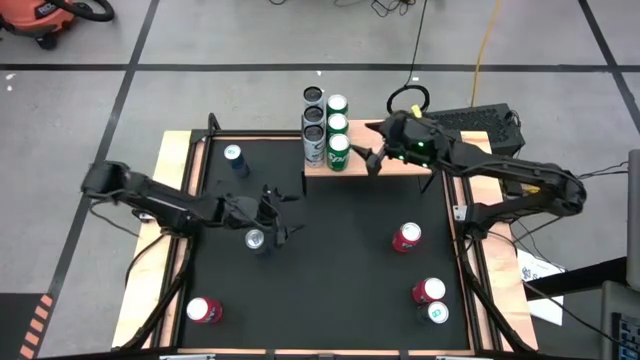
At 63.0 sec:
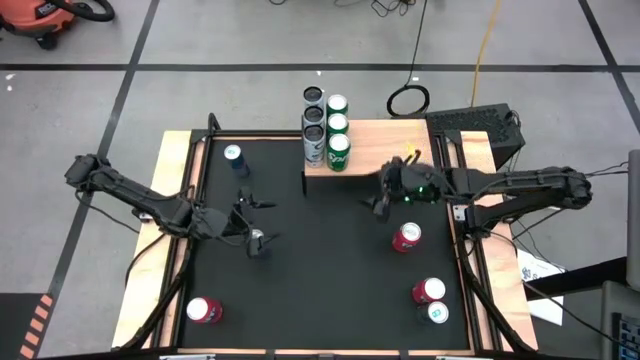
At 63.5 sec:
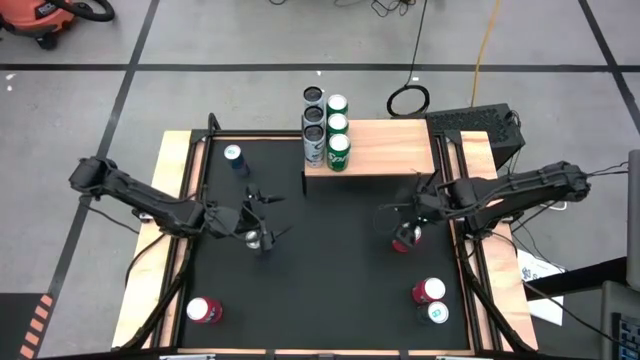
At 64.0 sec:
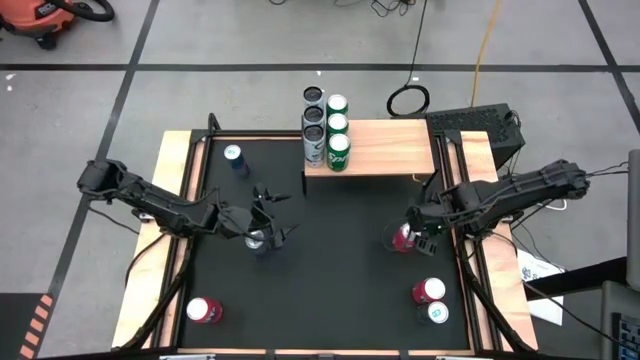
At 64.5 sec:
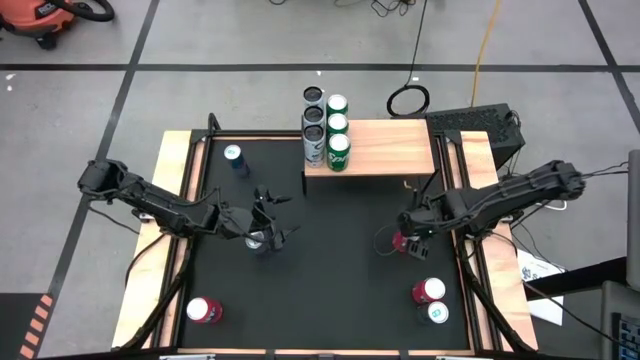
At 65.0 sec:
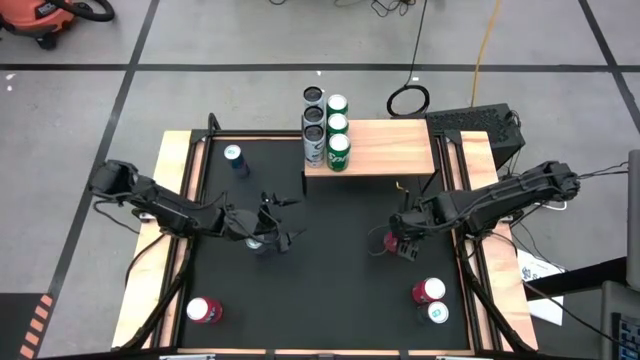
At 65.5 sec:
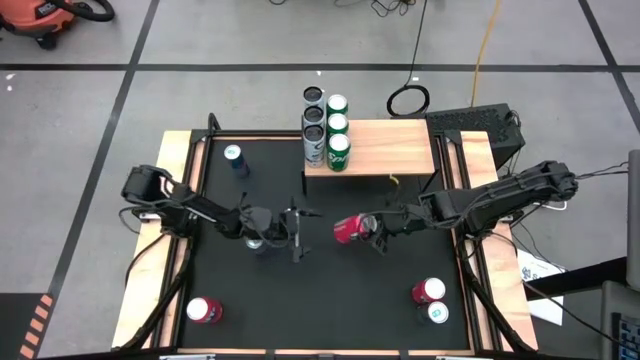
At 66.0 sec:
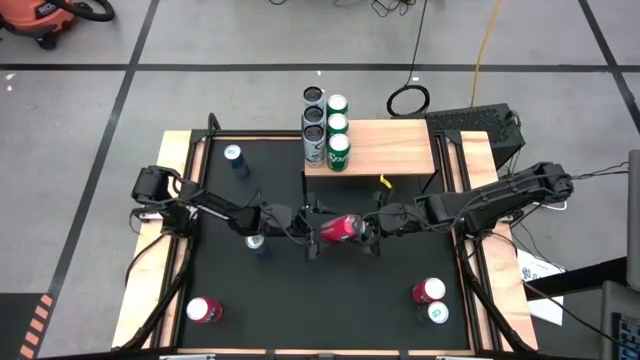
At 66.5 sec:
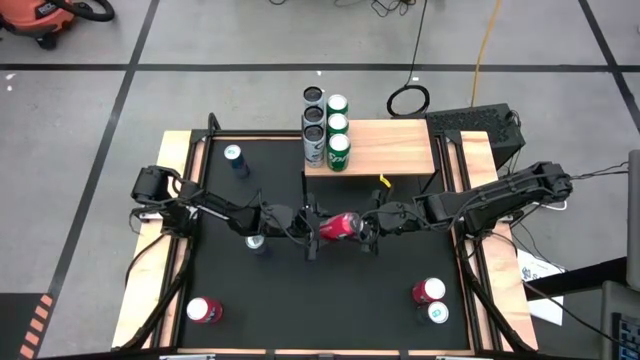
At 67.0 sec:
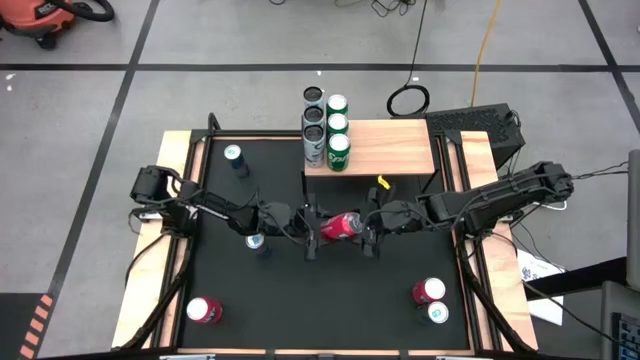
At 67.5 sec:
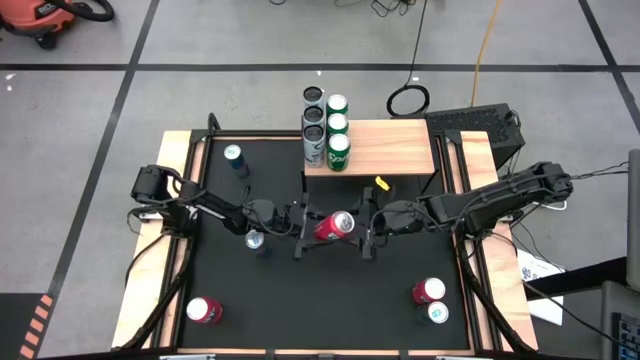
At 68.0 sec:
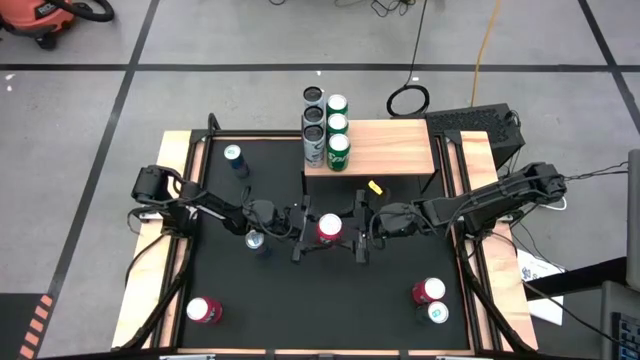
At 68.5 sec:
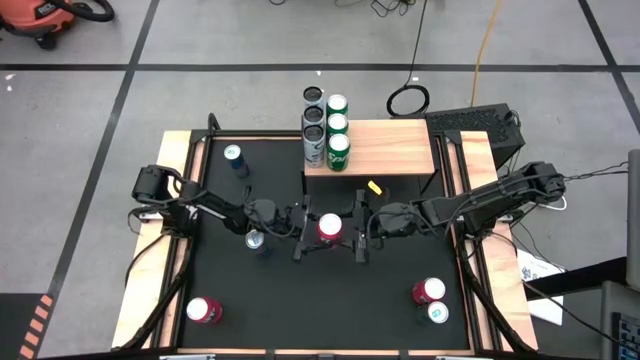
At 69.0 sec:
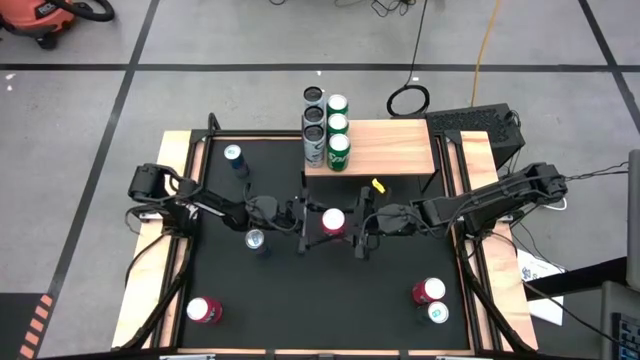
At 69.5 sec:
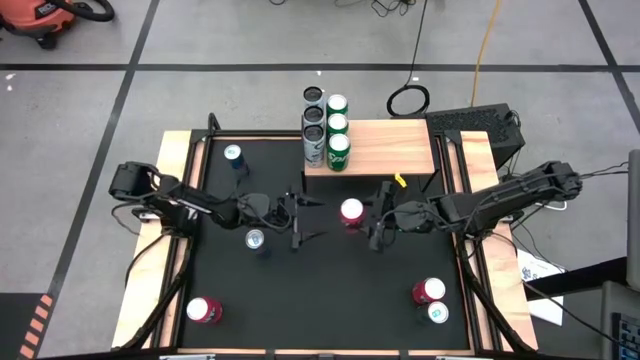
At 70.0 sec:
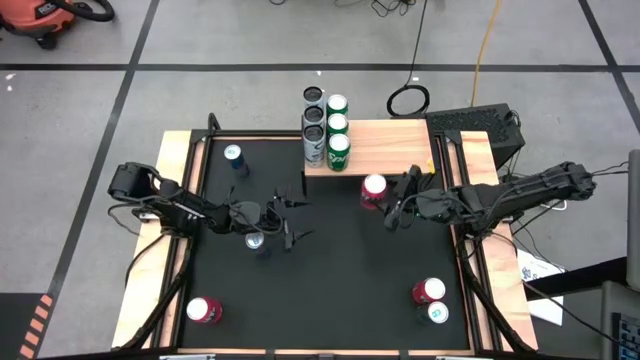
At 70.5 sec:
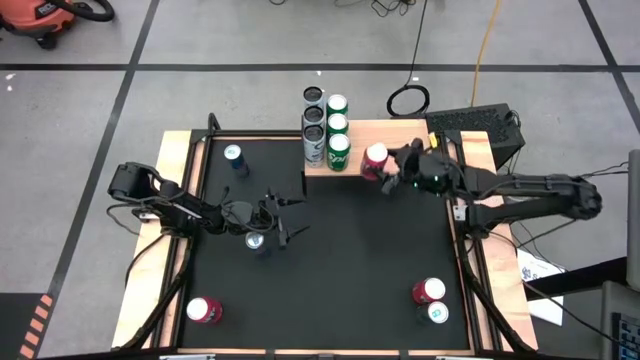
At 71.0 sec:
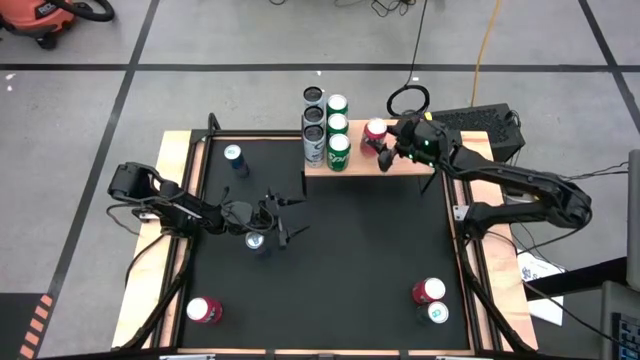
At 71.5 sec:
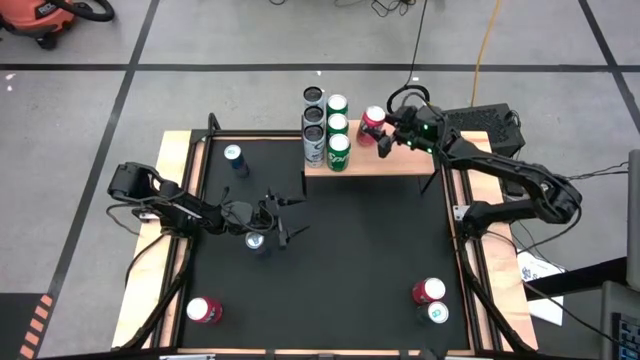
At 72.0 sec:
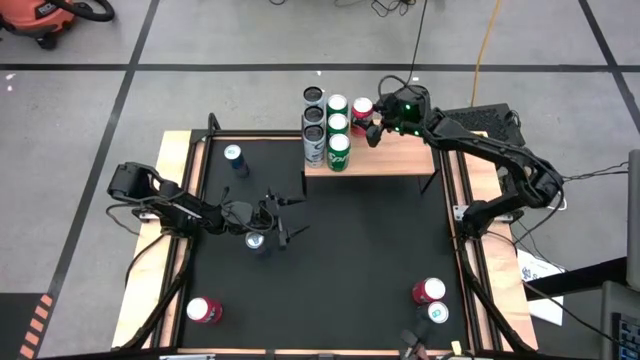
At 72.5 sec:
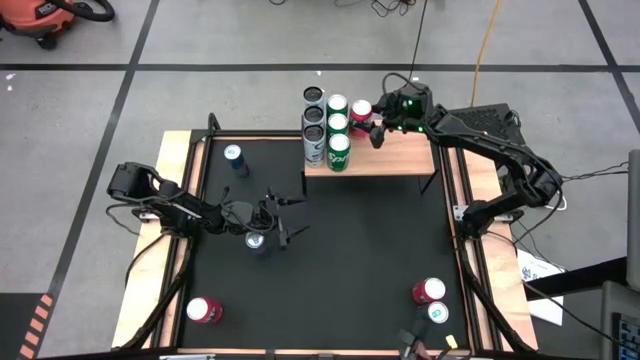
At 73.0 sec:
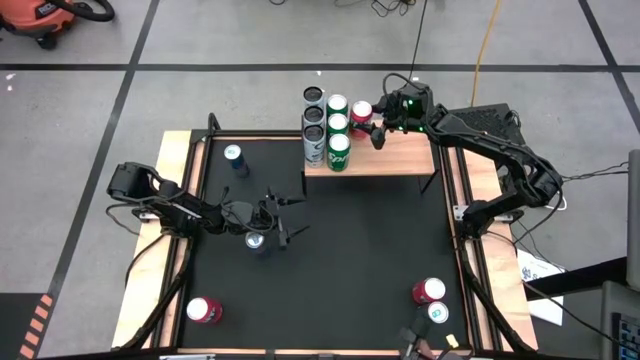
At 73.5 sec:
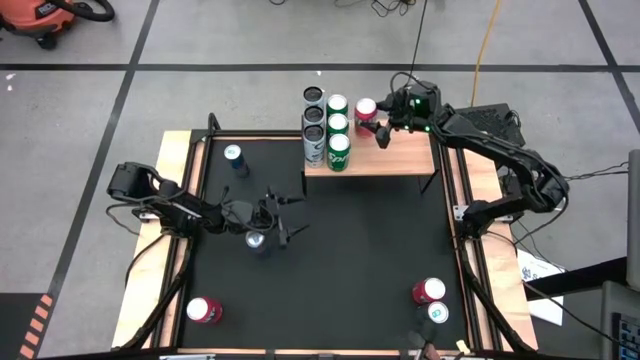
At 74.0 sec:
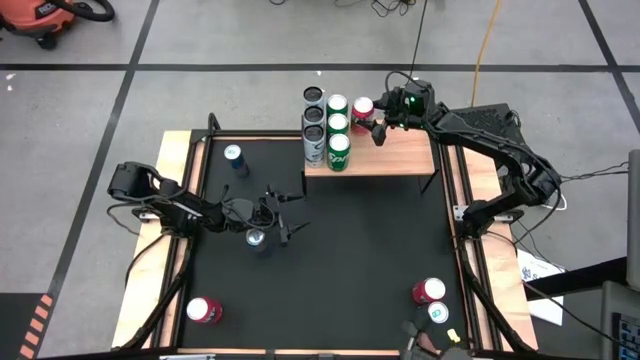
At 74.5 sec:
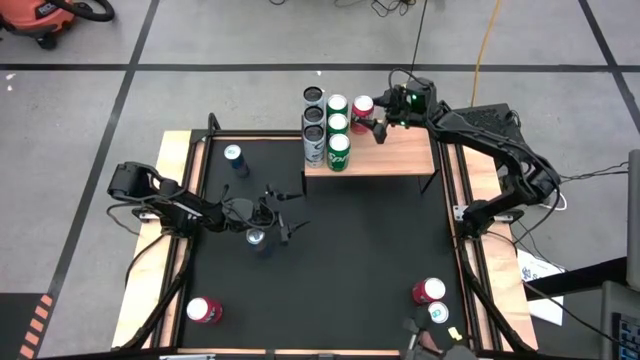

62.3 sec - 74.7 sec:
Task: Place canned beverage on shelf
Put the top red soda can on the shelf
